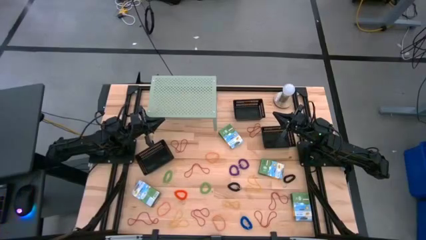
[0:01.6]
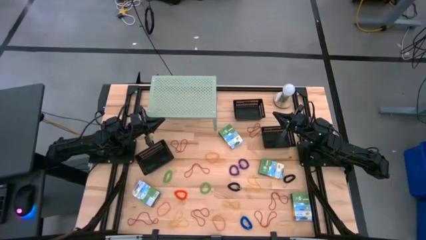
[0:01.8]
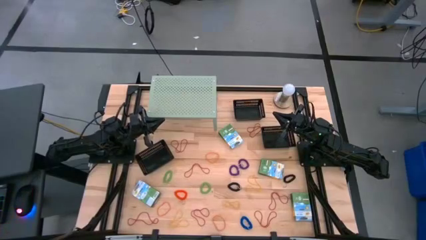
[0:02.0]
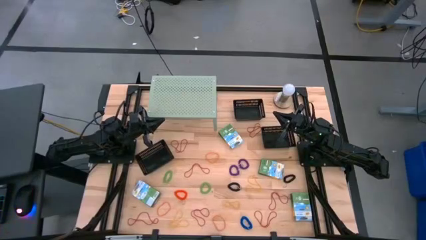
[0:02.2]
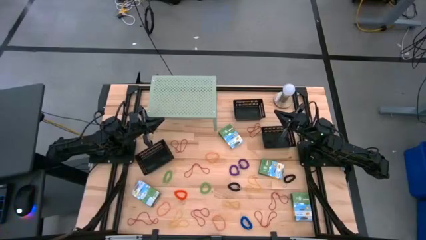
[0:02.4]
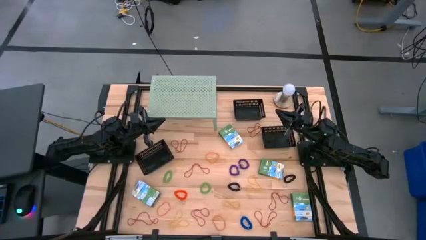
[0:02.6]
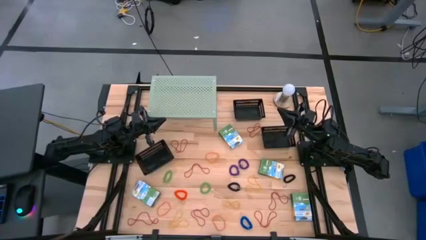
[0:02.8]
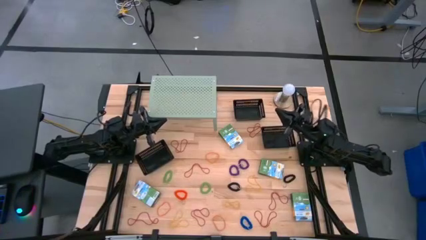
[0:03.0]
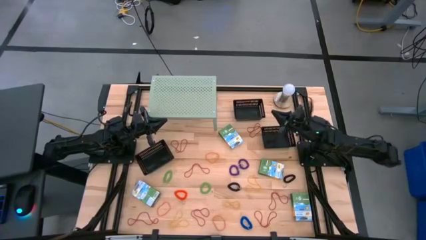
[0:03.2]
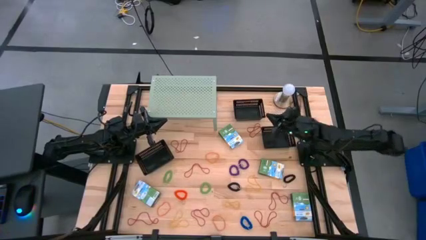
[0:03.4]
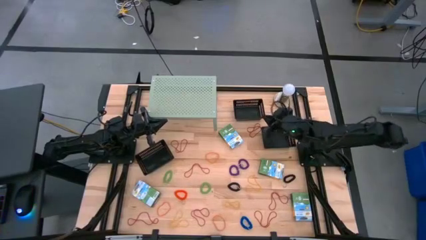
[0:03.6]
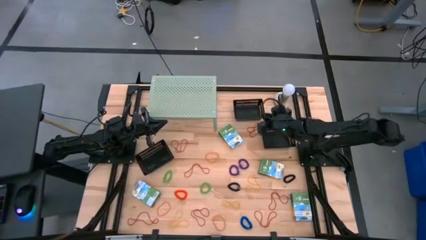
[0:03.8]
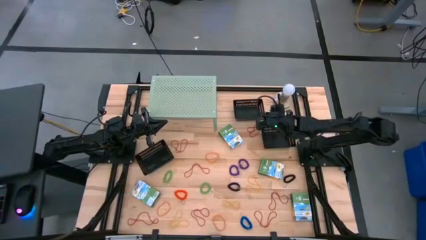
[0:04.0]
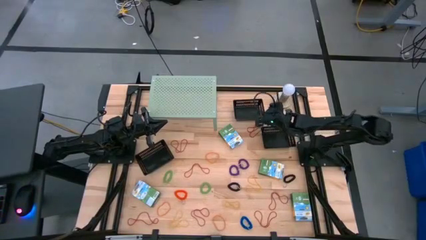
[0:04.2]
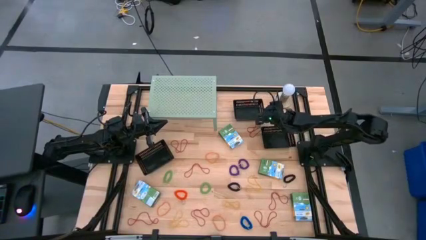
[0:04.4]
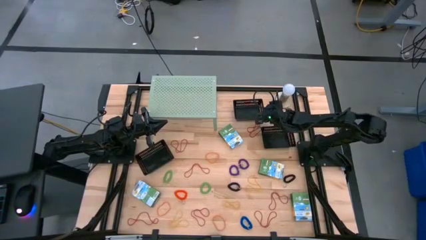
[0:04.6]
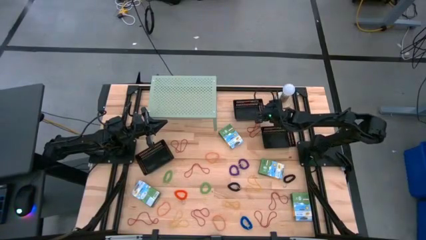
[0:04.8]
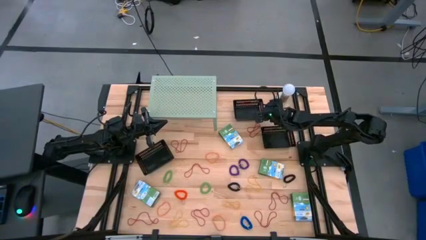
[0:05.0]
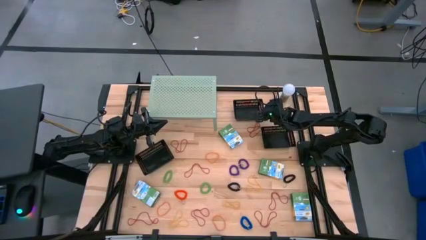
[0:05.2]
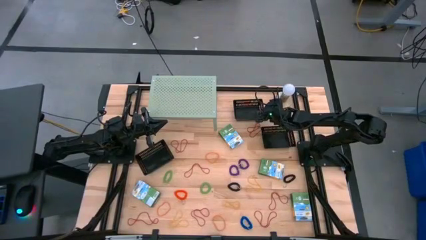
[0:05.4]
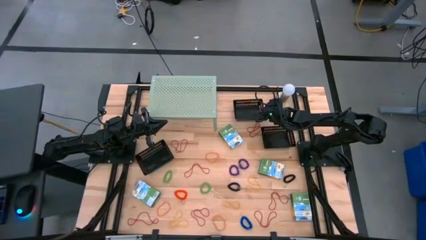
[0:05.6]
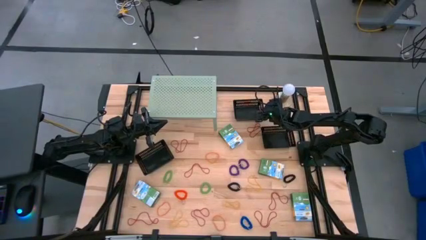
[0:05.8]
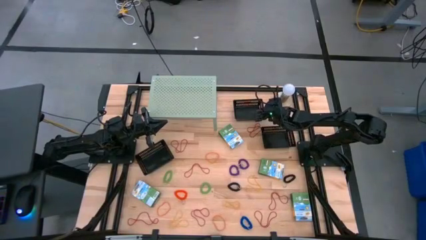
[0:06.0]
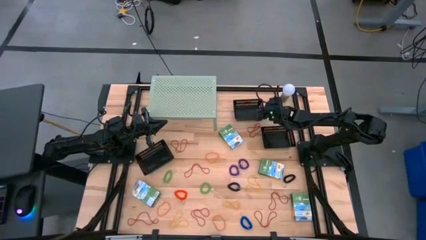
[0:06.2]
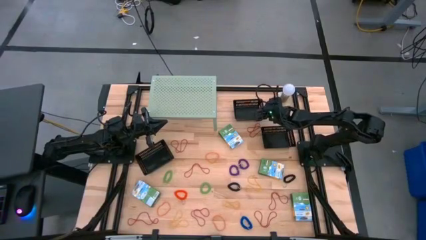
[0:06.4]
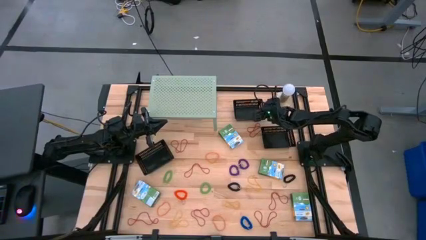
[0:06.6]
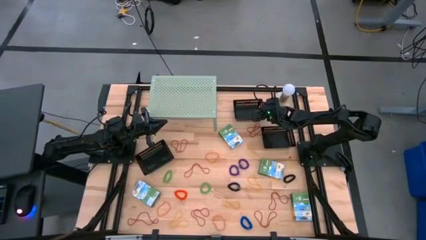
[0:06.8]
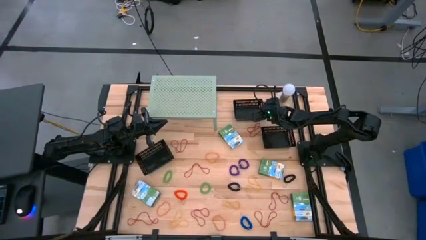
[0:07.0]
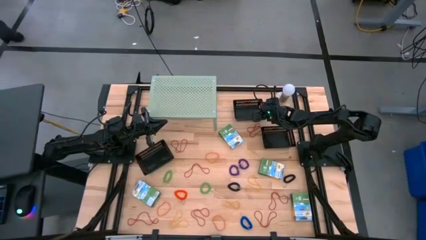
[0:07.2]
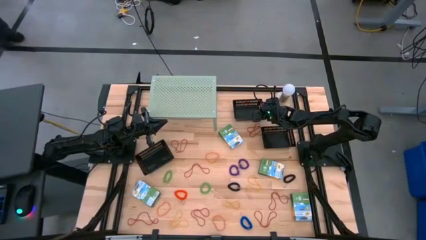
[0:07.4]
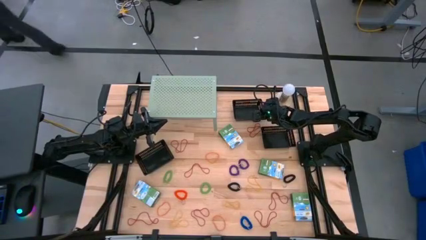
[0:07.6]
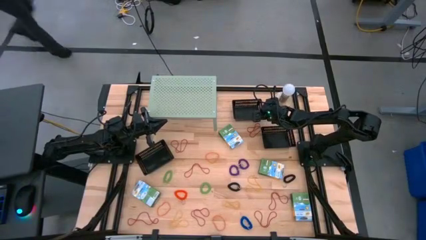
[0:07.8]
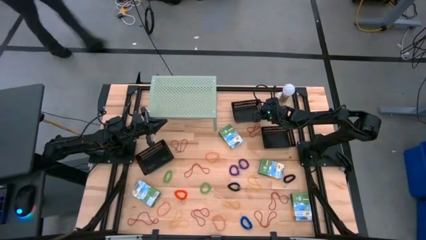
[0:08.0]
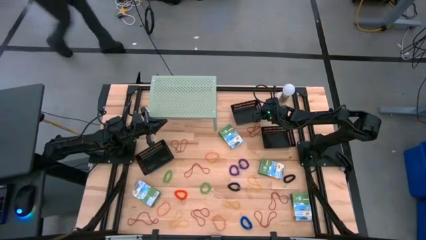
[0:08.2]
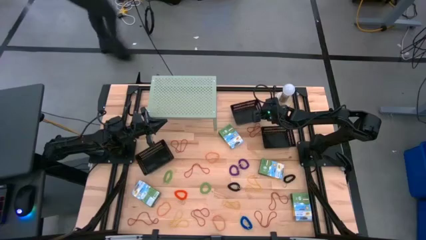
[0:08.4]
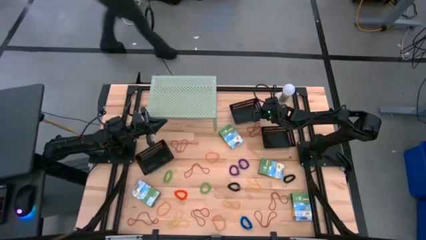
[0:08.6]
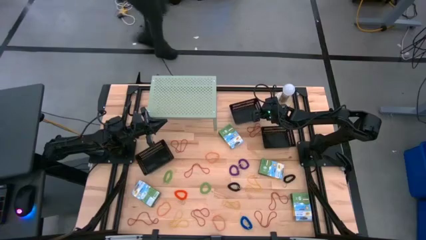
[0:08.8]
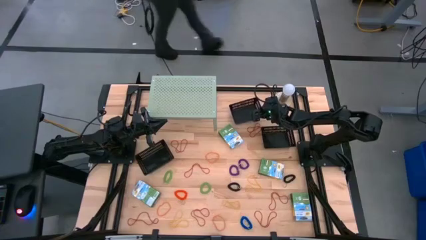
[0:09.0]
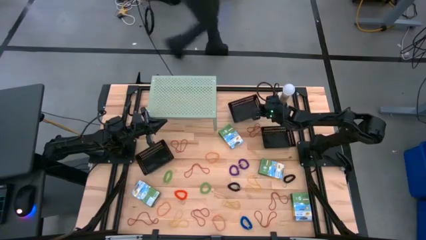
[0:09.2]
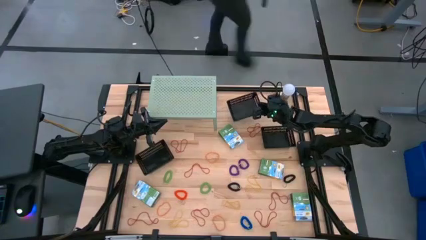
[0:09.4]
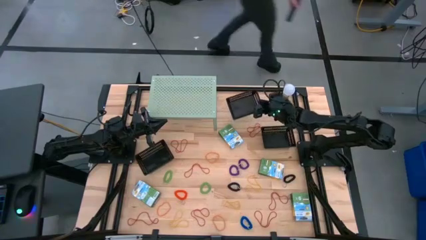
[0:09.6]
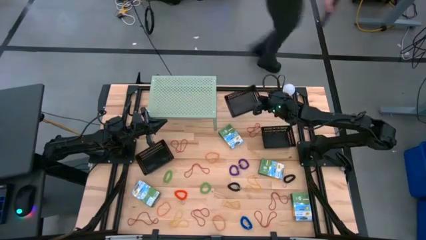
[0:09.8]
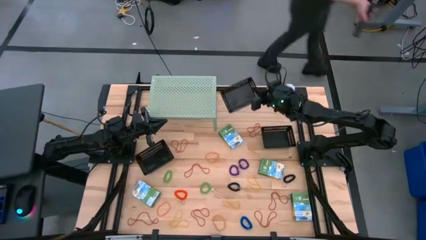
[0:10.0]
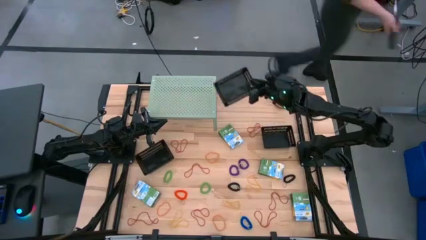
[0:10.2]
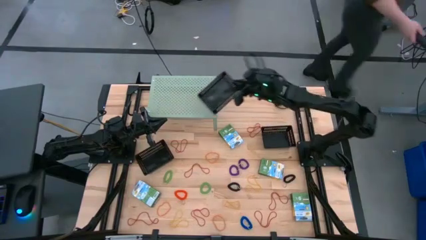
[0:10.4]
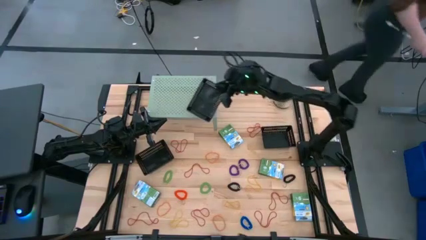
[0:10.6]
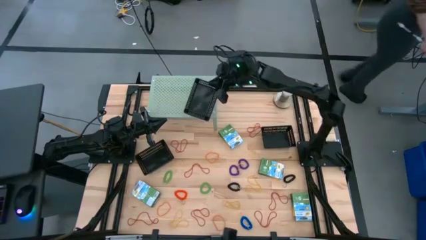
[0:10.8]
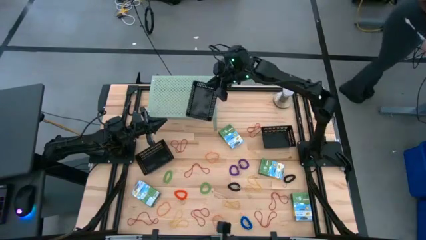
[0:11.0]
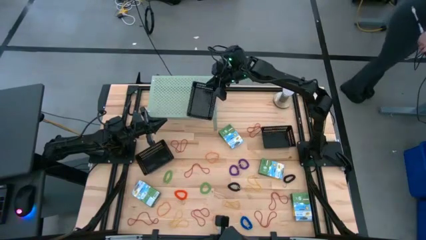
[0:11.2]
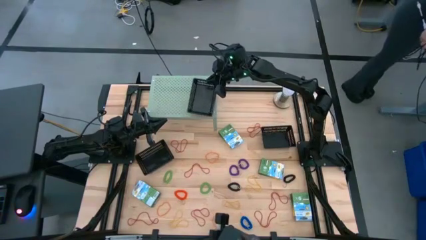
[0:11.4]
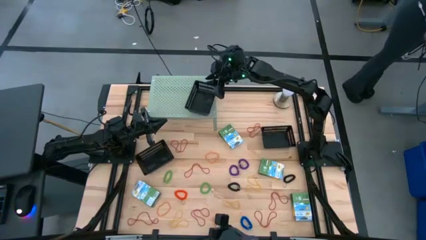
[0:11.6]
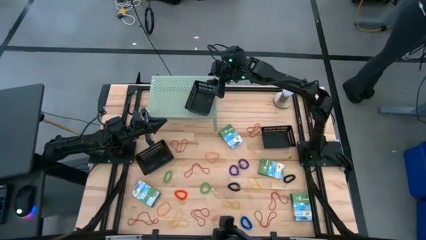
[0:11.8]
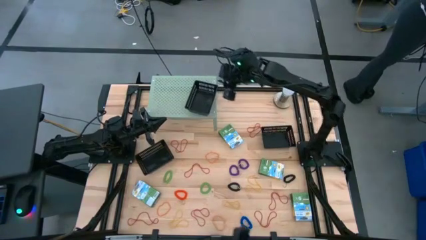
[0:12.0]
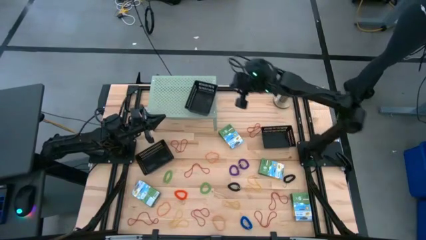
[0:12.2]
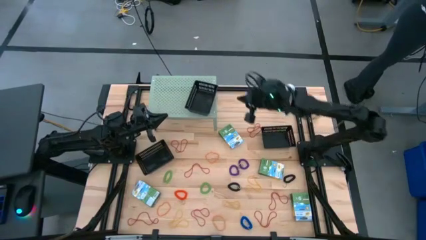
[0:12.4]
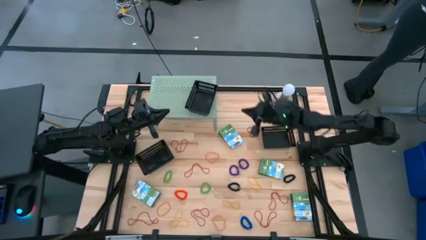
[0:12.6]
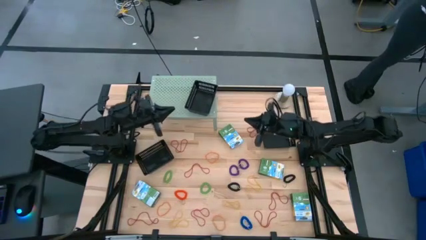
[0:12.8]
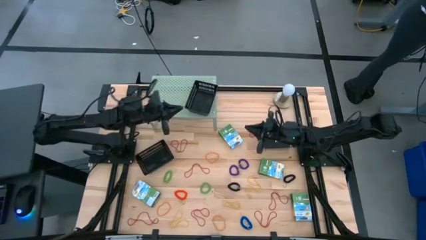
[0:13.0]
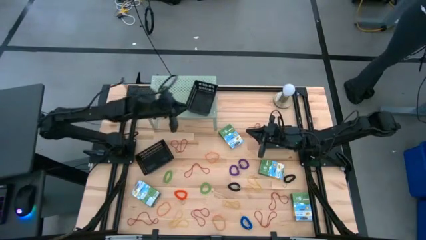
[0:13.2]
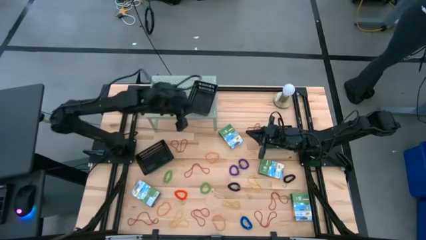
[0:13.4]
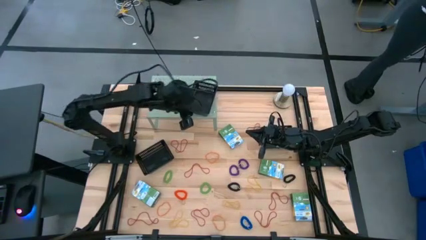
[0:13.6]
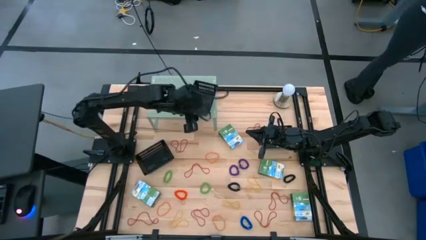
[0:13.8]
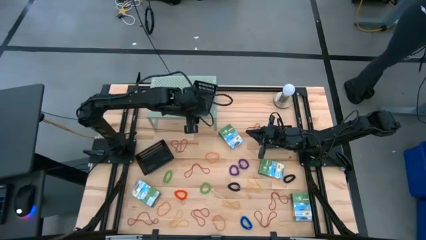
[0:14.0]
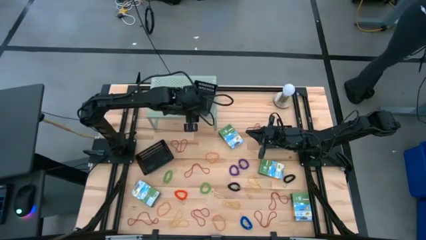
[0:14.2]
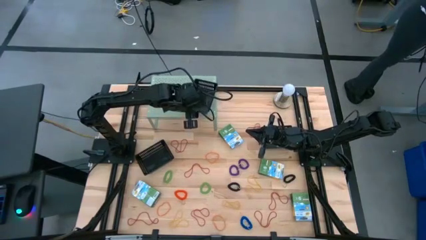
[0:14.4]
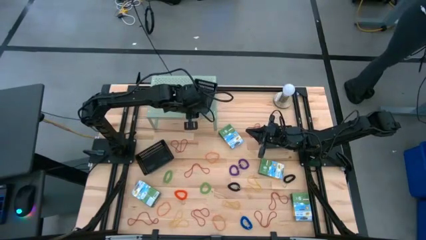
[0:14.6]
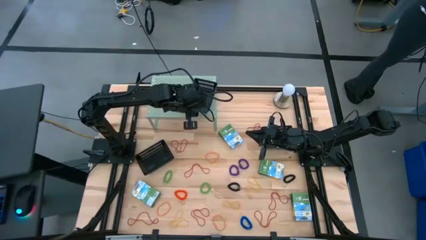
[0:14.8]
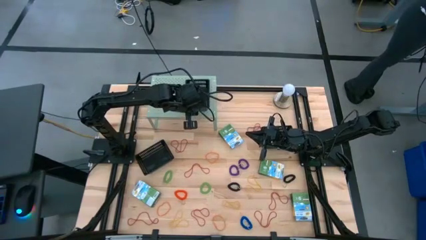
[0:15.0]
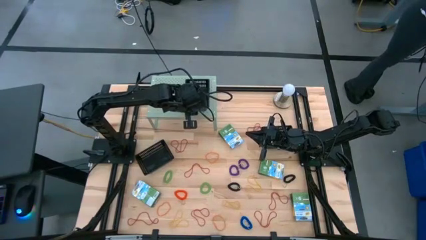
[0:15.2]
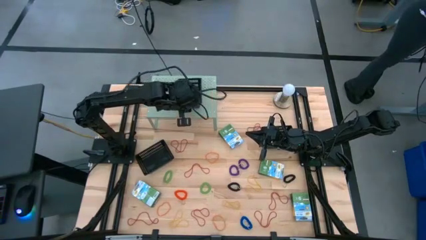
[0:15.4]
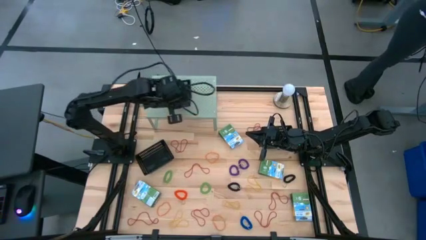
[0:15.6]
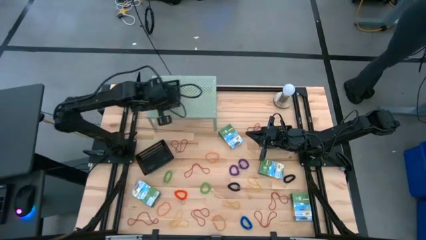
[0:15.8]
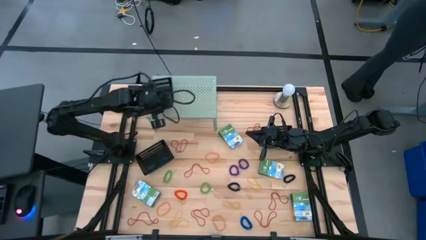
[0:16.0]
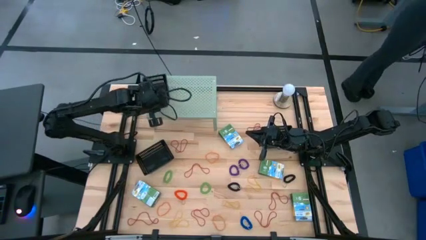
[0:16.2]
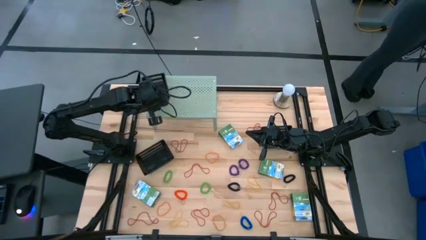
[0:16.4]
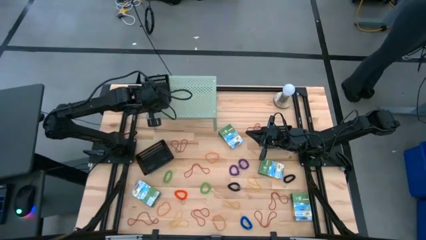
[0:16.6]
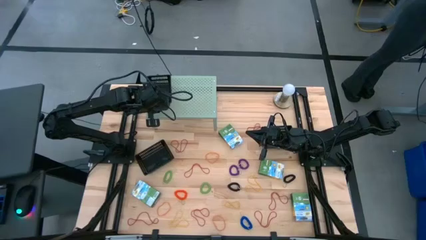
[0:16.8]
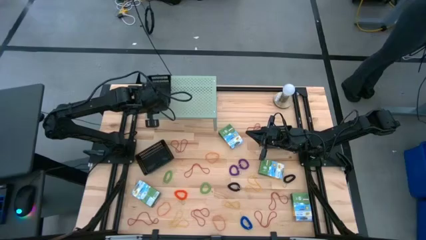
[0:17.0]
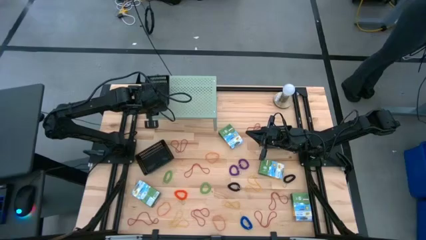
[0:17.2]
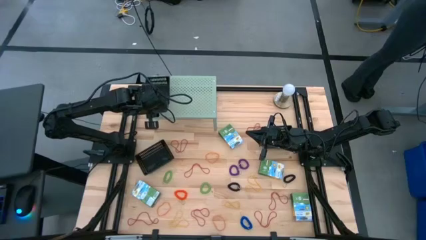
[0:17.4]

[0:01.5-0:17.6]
Task: Pick & Place Office Desk Supplies
Put the black bin on the shelf
